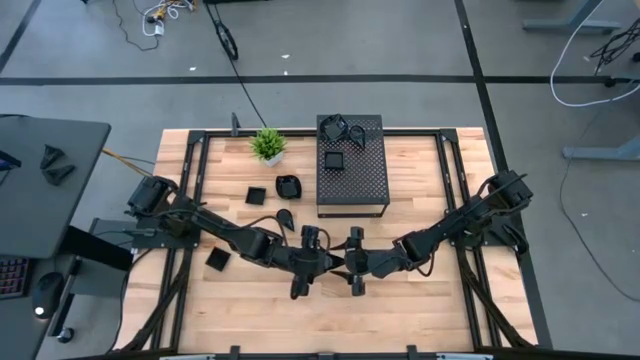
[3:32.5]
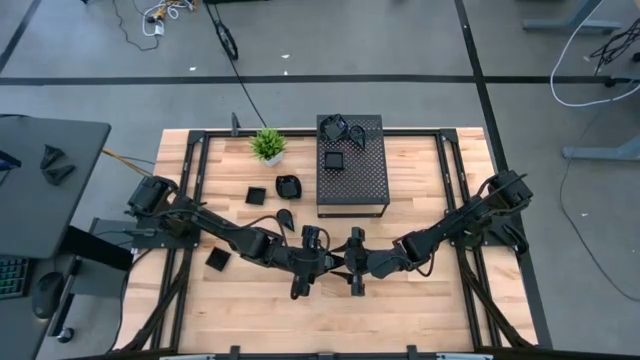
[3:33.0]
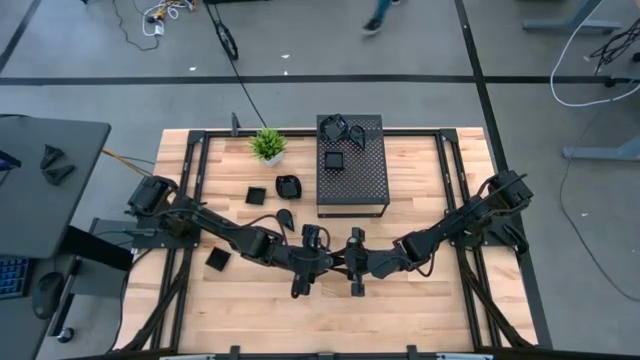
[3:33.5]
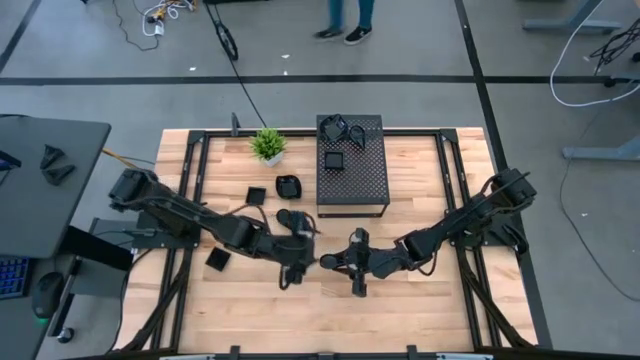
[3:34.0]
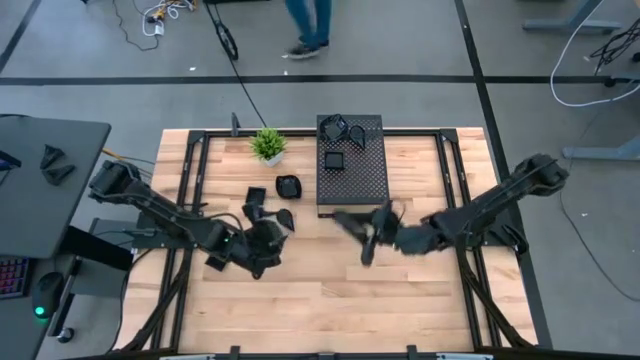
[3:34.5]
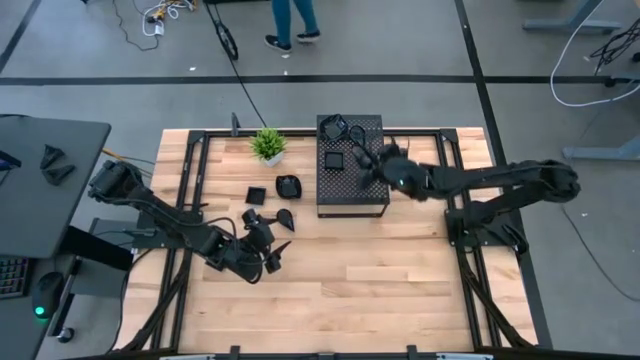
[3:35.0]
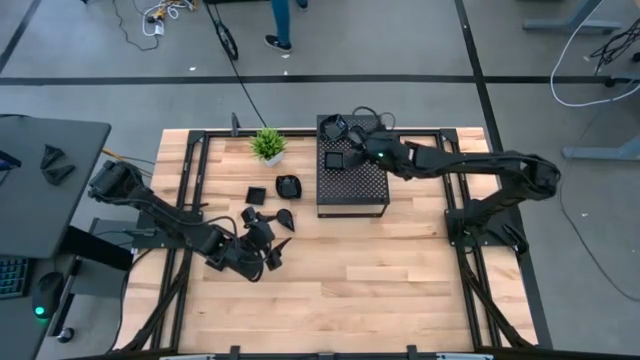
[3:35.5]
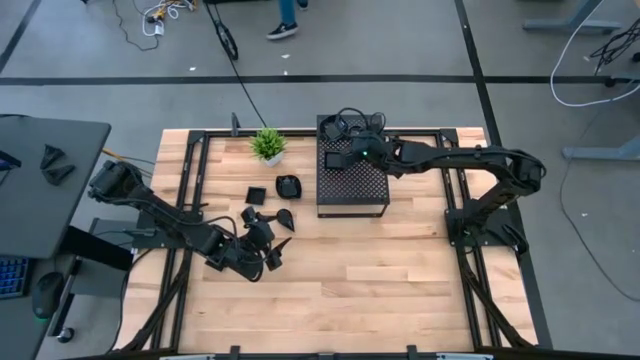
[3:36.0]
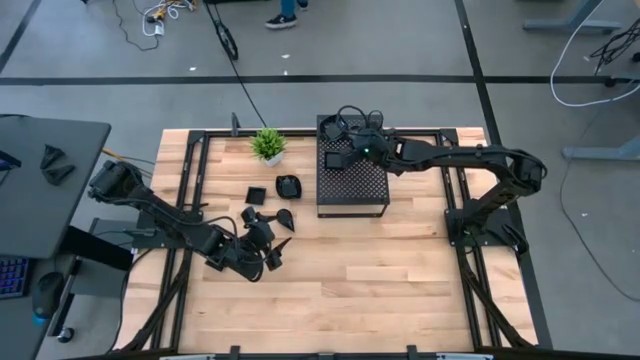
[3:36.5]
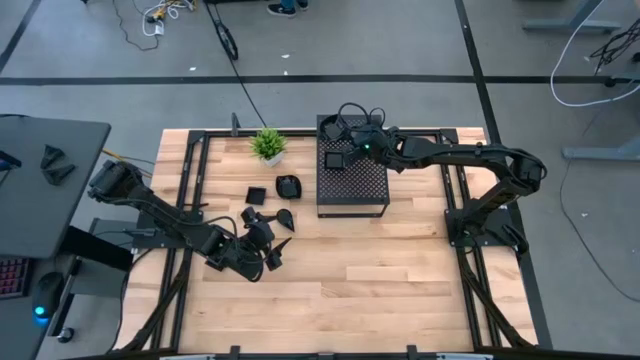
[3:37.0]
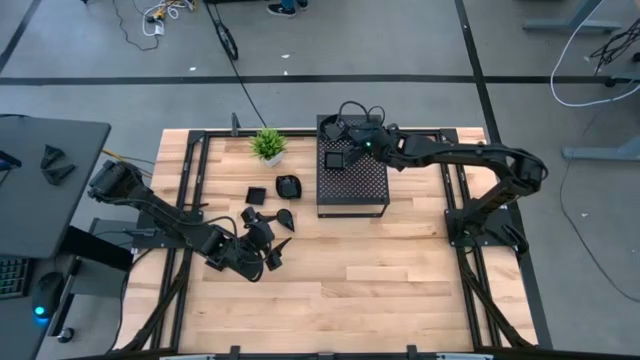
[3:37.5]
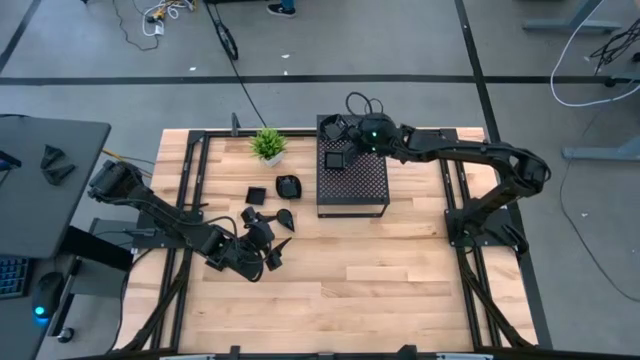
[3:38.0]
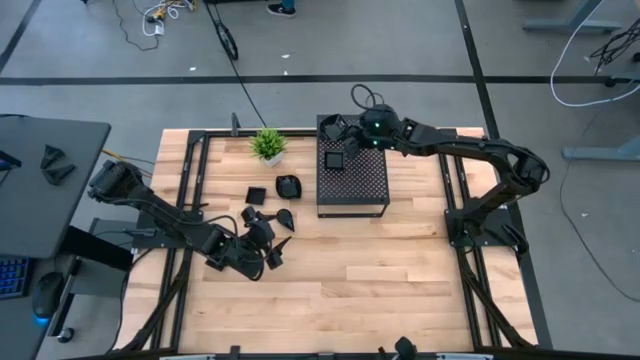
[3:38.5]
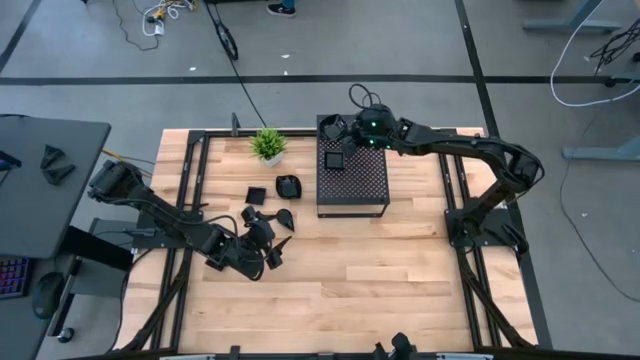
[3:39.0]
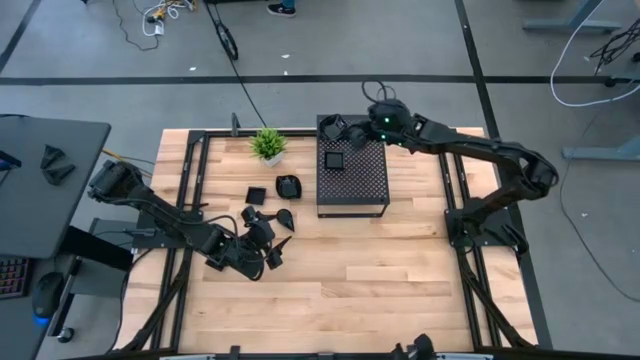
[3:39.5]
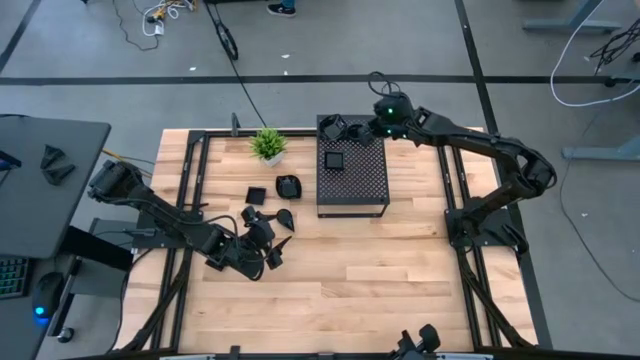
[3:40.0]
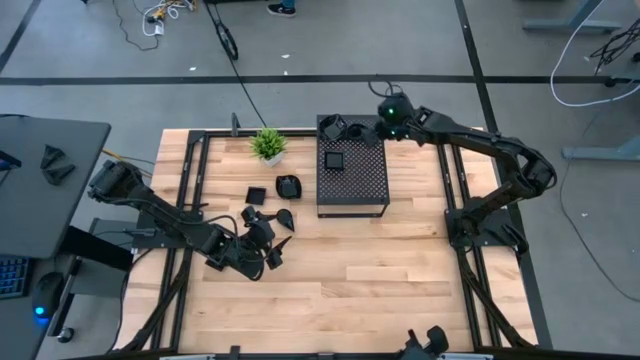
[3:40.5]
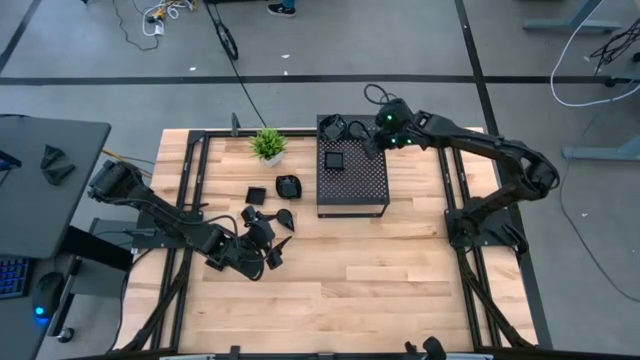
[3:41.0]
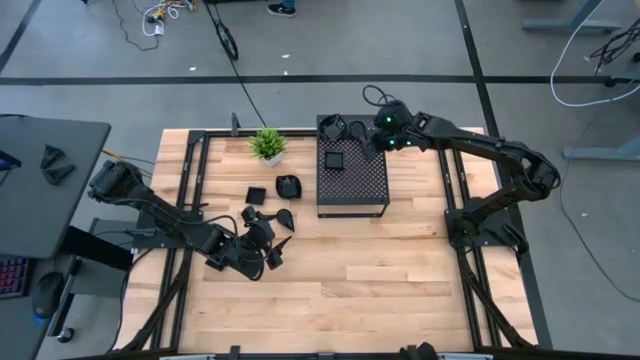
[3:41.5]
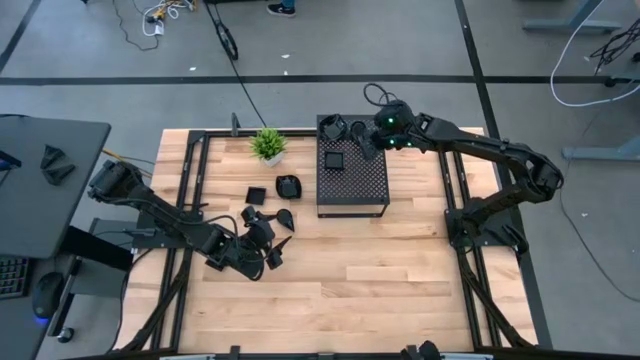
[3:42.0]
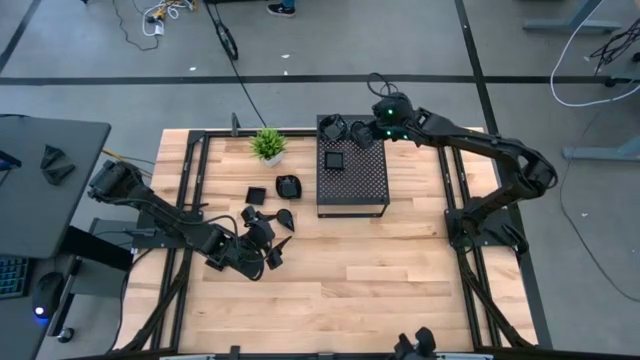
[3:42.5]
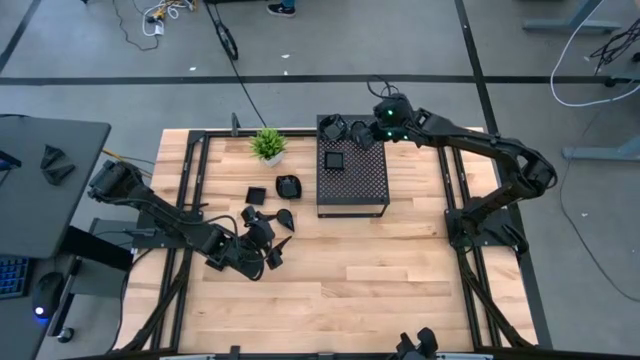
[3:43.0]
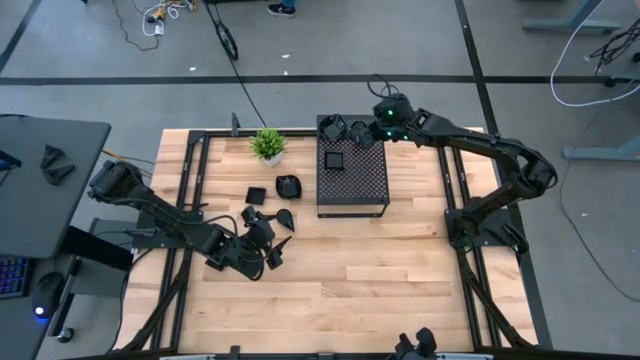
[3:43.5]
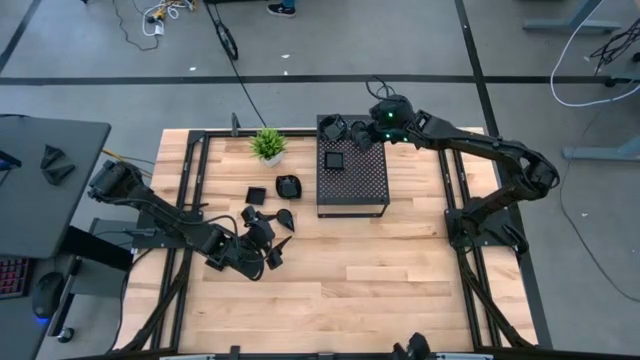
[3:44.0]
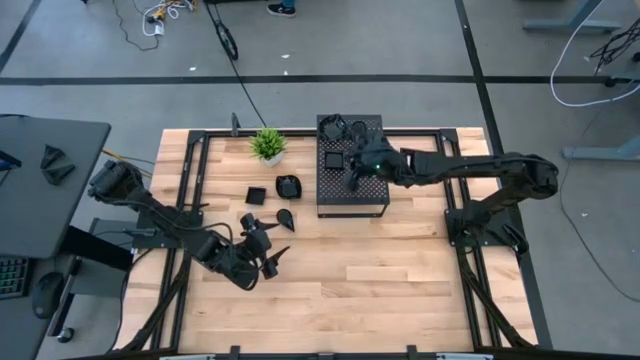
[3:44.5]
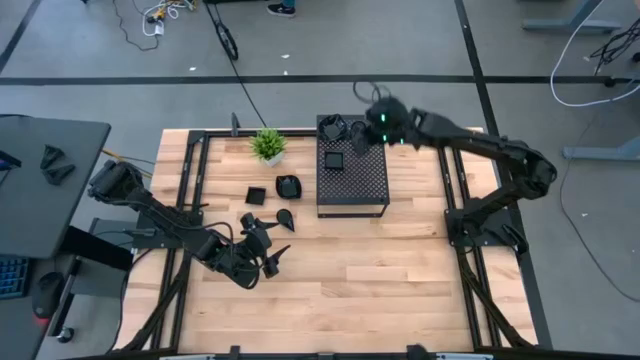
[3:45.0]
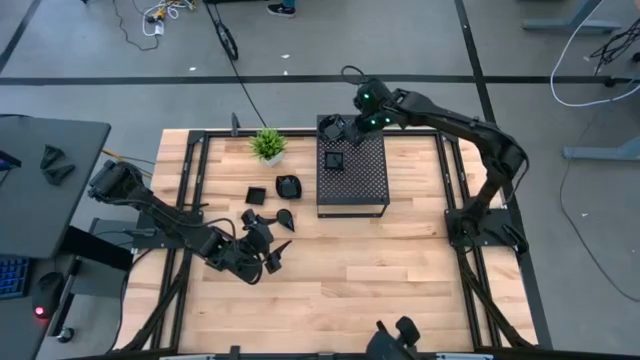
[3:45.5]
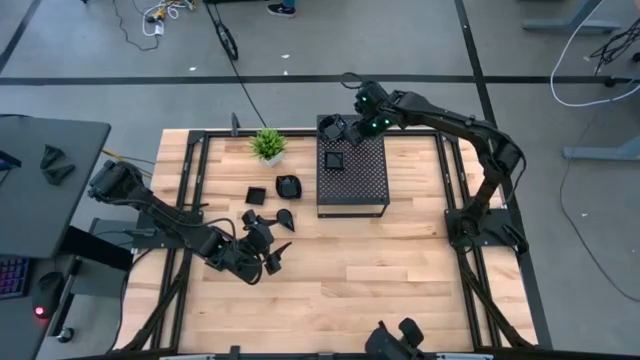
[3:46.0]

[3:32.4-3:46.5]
Task: Pick & Place Mini shaped plates
Stack the bottom drop shaped plate on top of the drop shaped plates on the shelf

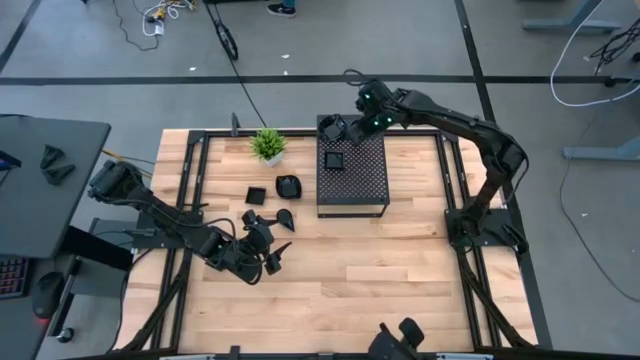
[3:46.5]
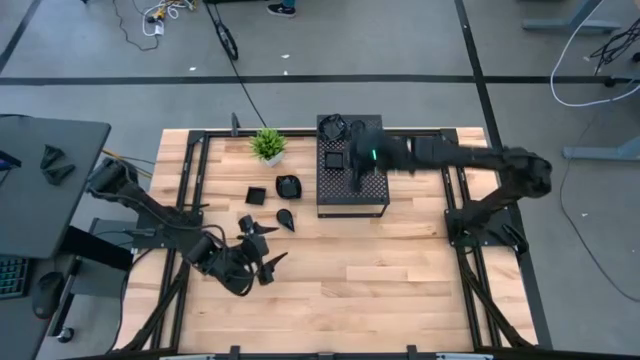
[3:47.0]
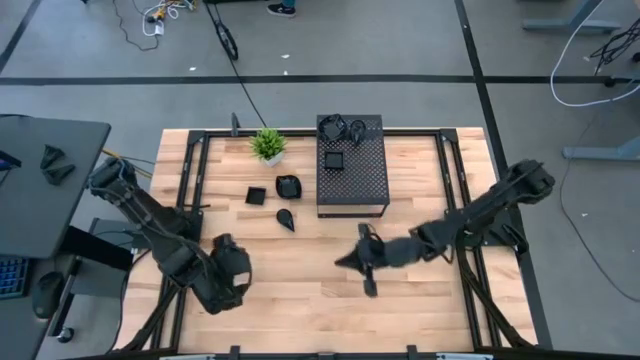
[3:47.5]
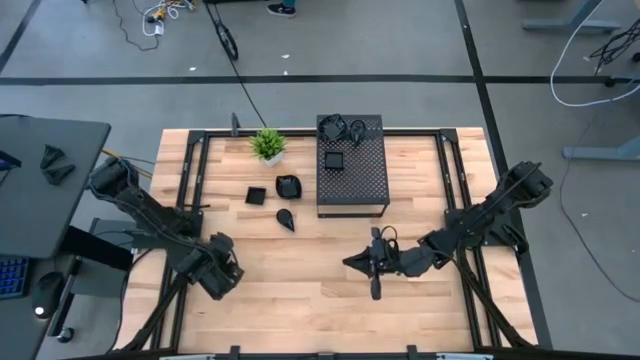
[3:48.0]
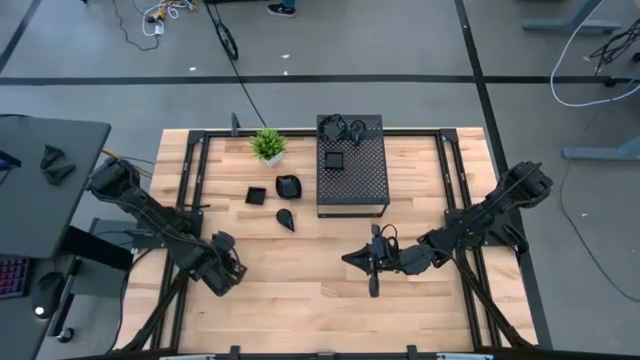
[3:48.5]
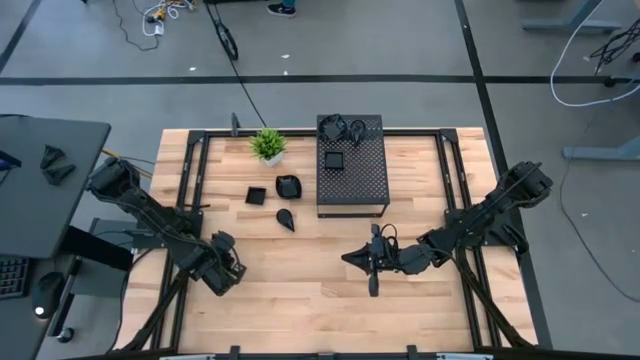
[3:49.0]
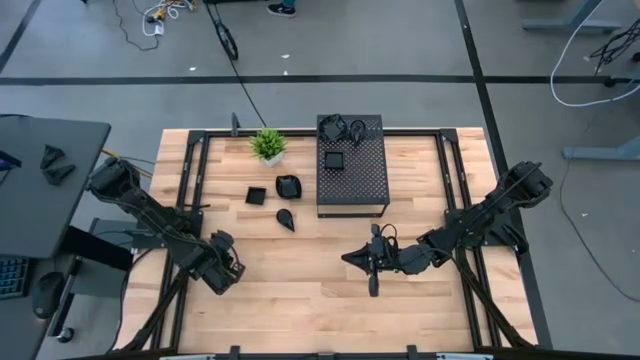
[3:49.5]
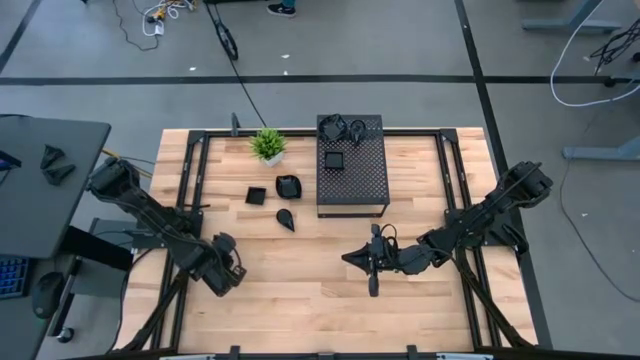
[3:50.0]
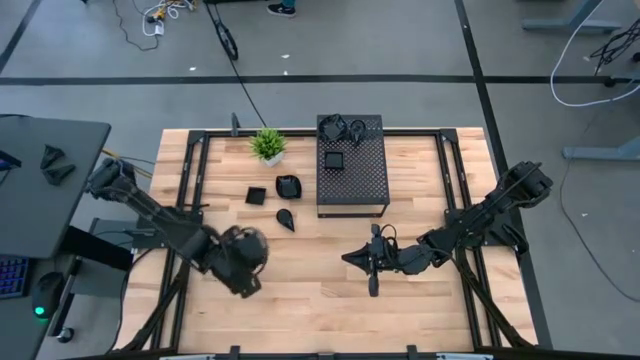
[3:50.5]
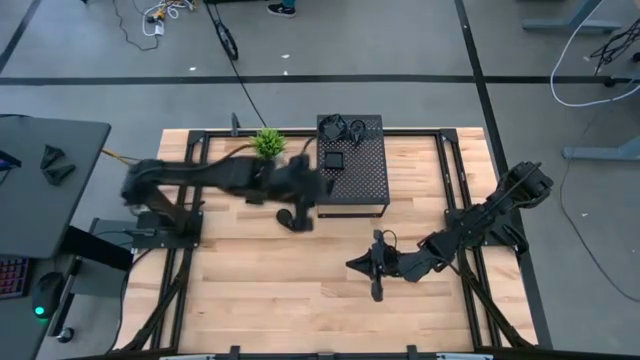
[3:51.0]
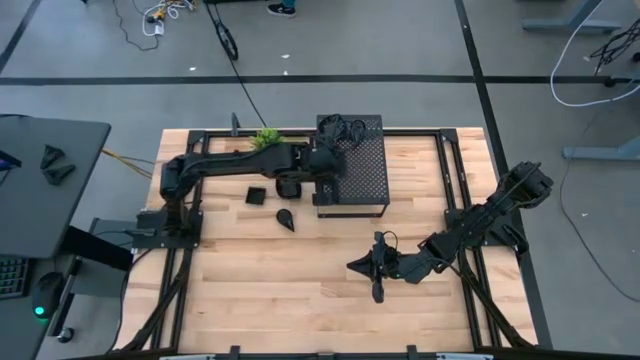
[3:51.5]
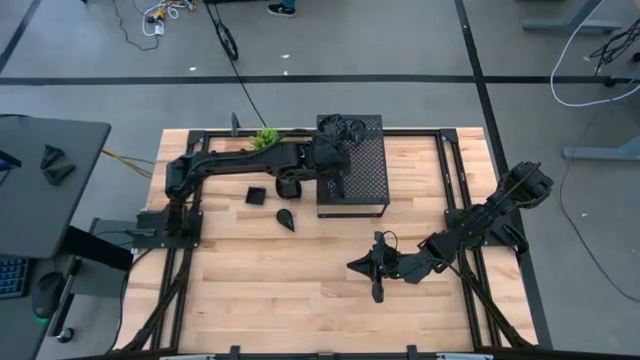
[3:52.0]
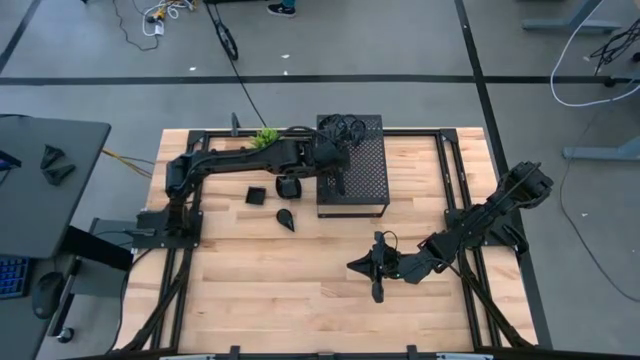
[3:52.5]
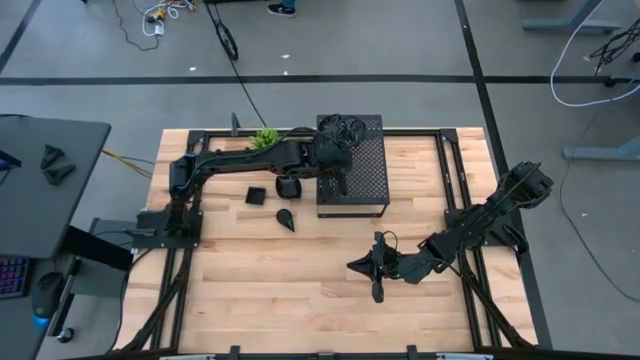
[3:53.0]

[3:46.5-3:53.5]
Stack the bottom square plate on top of the square plates on the shelf

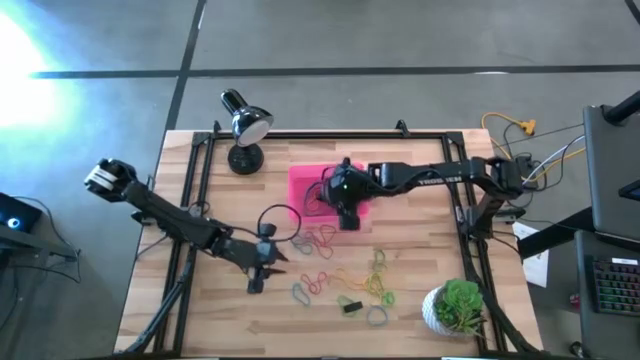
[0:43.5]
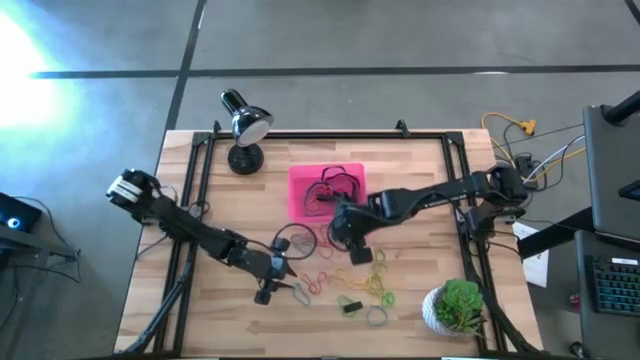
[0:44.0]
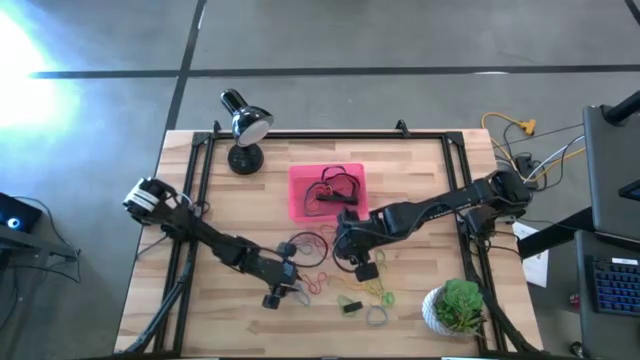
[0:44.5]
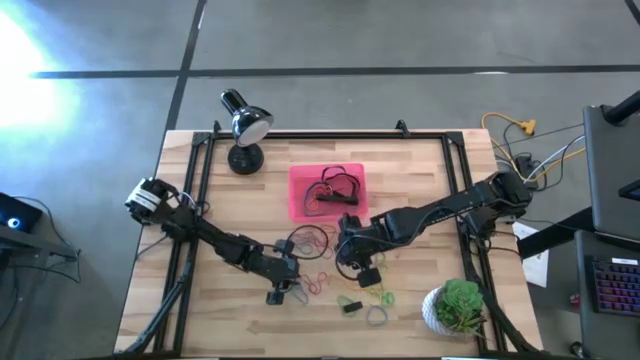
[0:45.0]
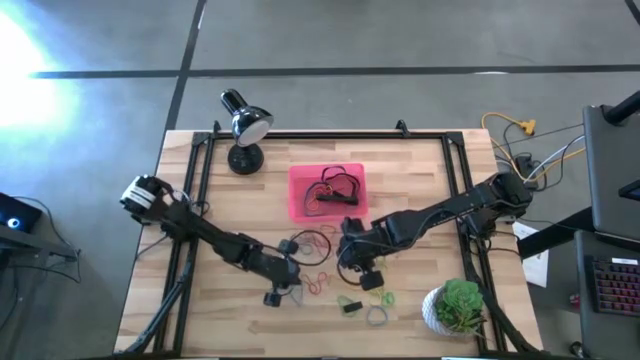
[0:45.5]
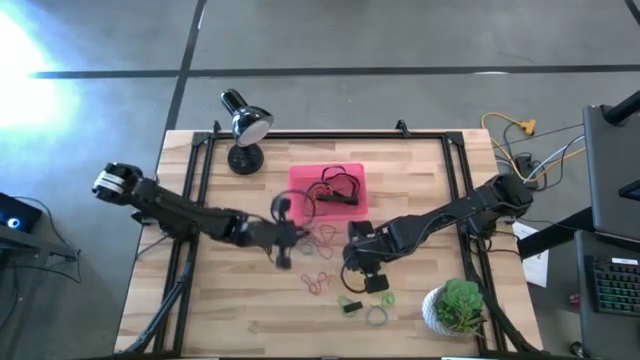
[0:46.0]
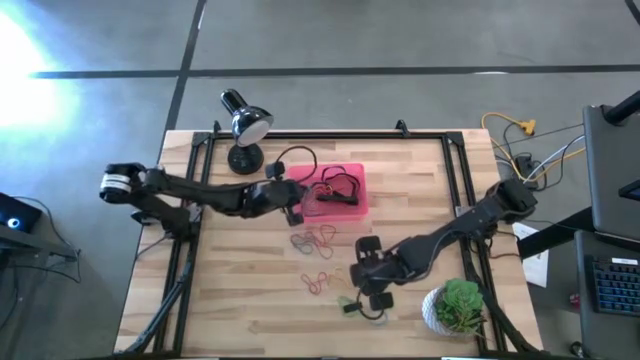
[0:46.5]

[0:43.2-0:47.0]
Task: Pick and place rubber bands into bin
Put the blue rubber band into the red bin
